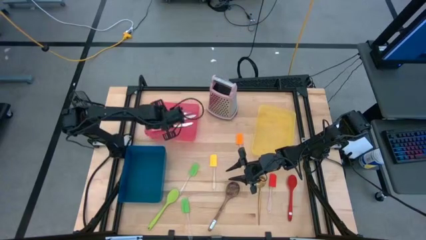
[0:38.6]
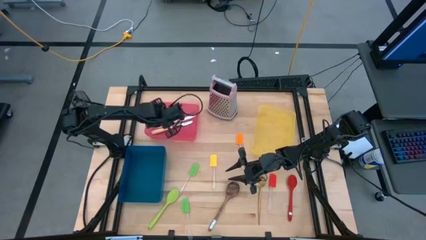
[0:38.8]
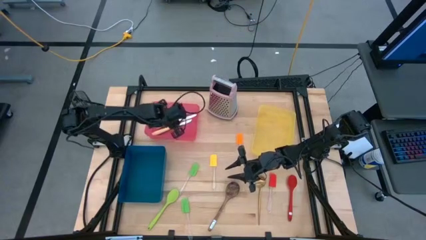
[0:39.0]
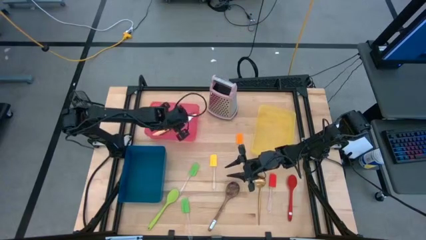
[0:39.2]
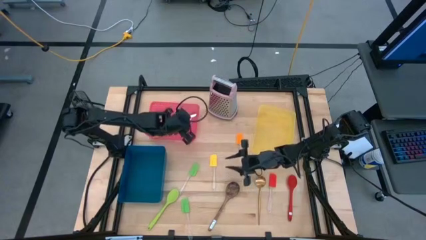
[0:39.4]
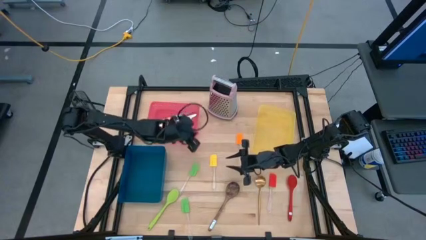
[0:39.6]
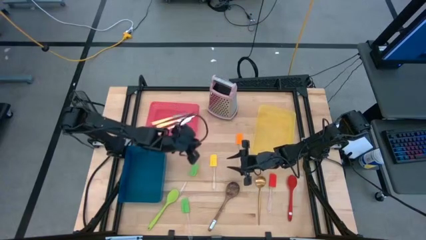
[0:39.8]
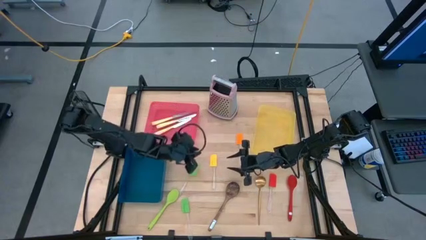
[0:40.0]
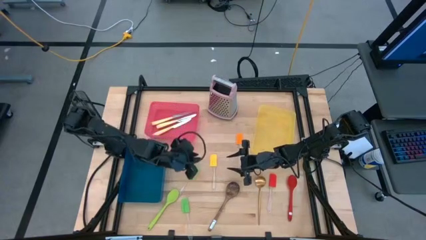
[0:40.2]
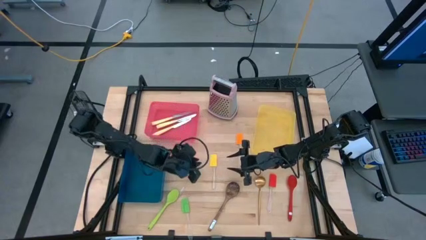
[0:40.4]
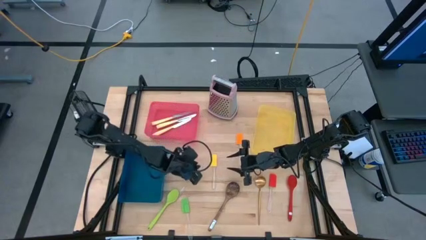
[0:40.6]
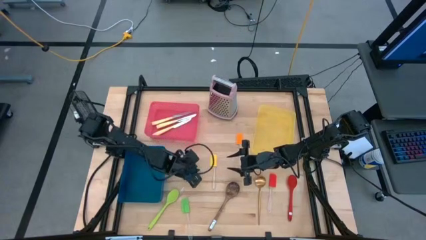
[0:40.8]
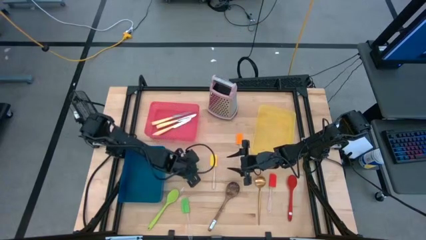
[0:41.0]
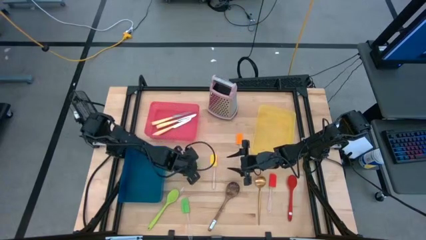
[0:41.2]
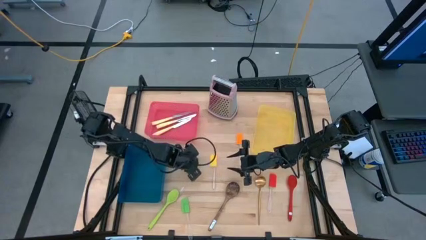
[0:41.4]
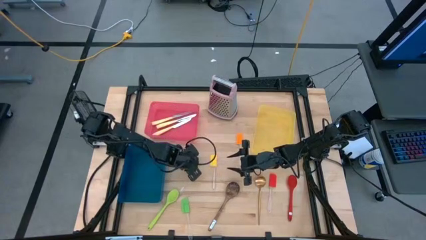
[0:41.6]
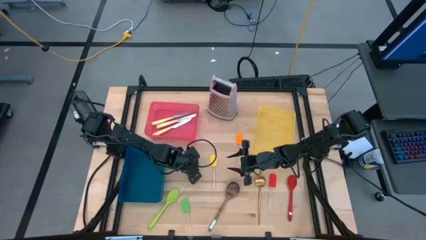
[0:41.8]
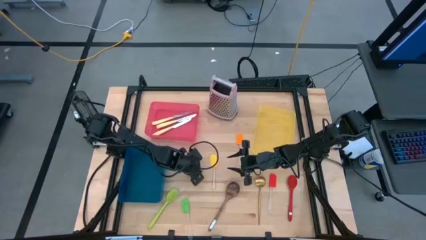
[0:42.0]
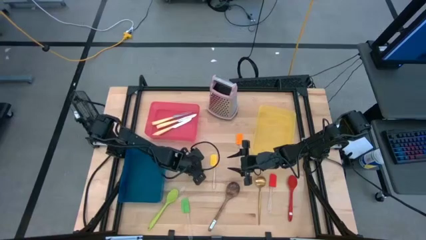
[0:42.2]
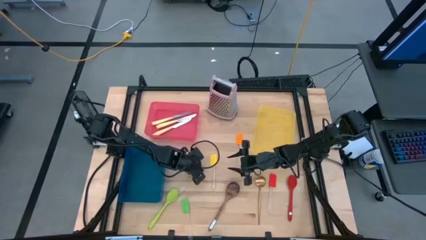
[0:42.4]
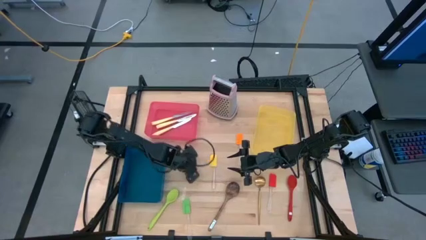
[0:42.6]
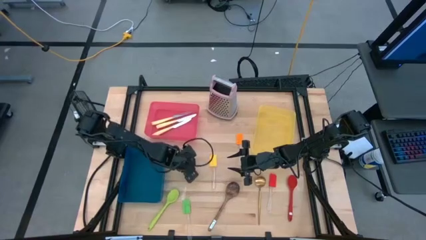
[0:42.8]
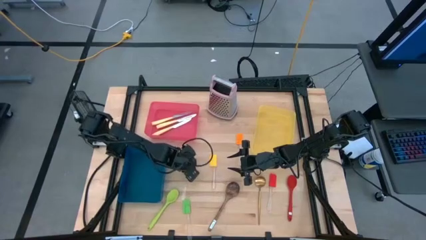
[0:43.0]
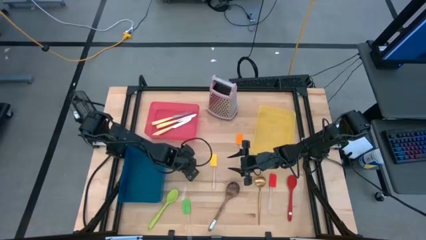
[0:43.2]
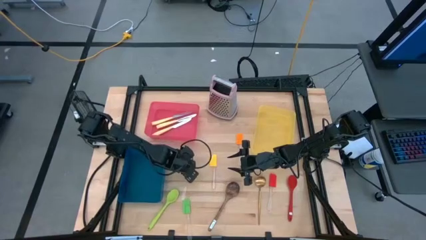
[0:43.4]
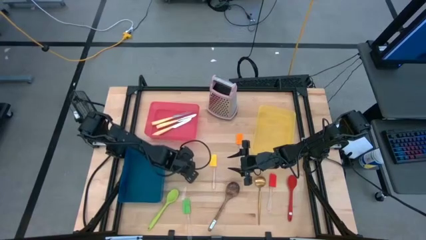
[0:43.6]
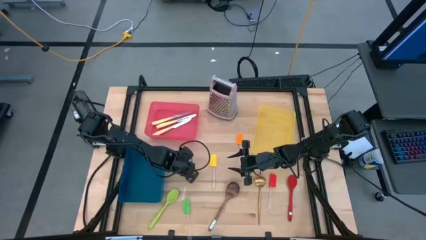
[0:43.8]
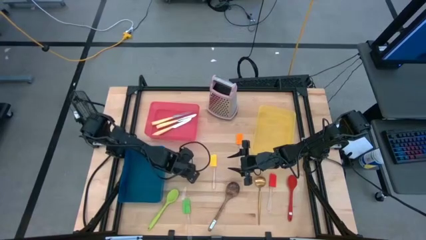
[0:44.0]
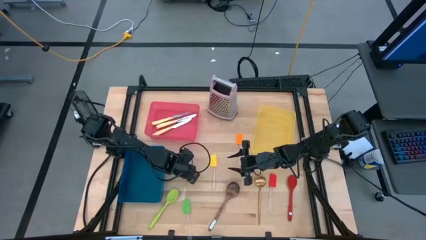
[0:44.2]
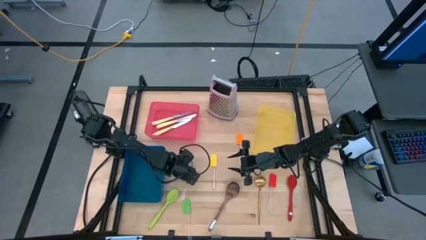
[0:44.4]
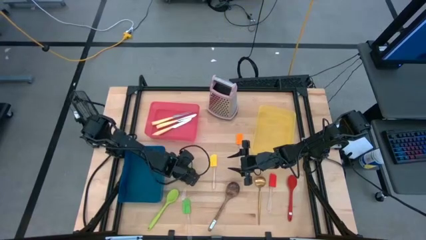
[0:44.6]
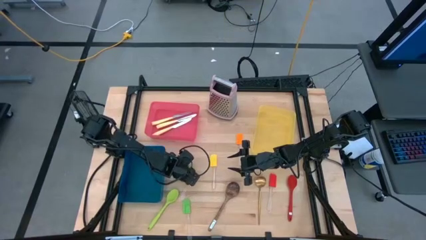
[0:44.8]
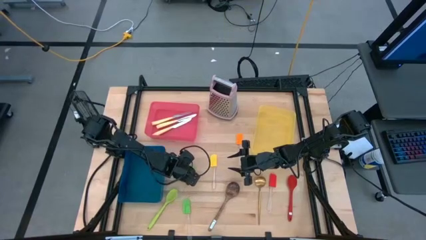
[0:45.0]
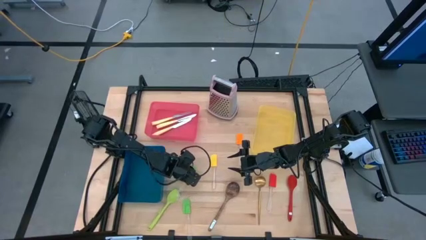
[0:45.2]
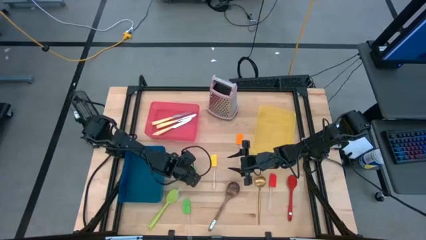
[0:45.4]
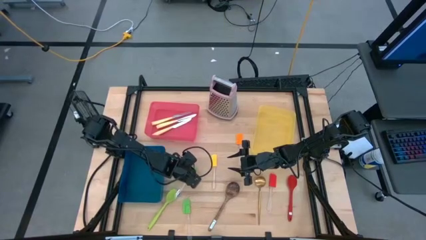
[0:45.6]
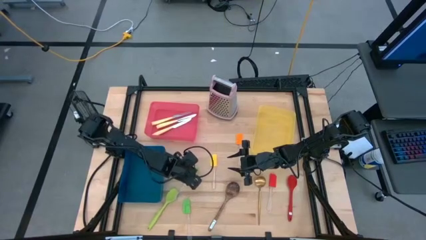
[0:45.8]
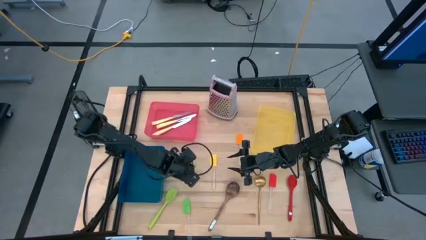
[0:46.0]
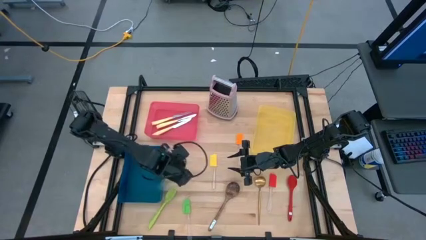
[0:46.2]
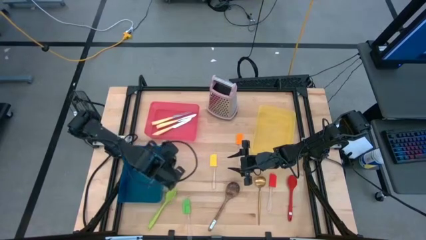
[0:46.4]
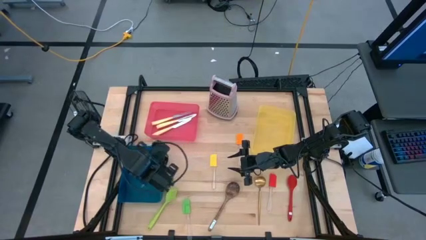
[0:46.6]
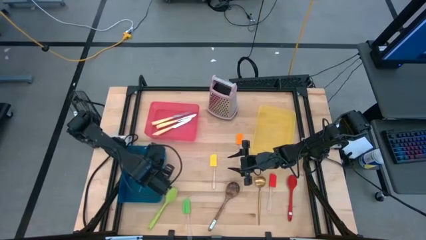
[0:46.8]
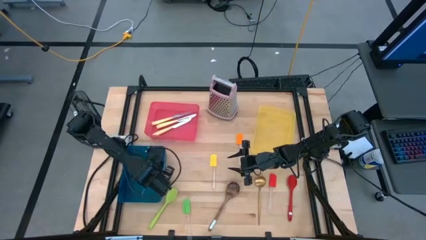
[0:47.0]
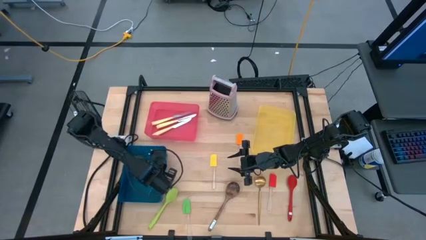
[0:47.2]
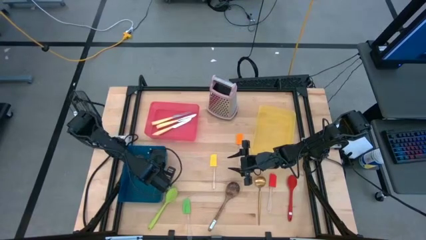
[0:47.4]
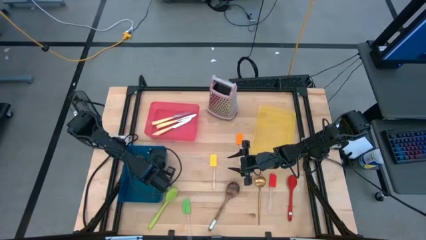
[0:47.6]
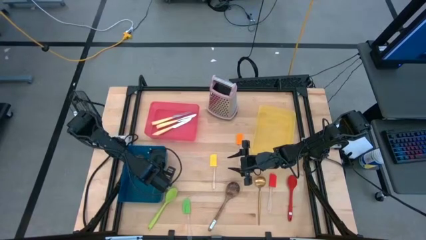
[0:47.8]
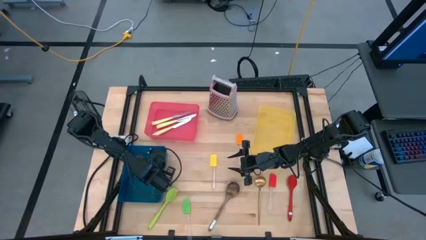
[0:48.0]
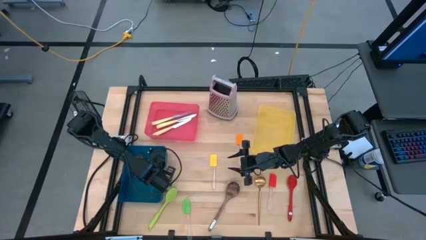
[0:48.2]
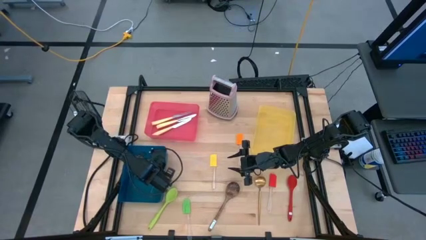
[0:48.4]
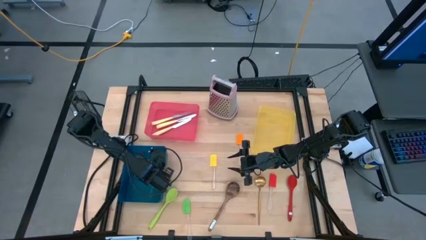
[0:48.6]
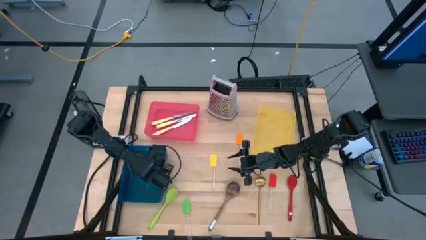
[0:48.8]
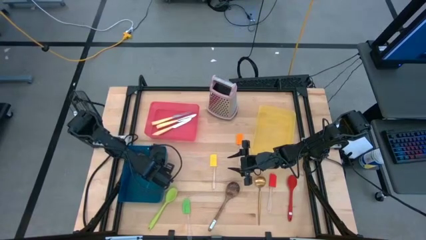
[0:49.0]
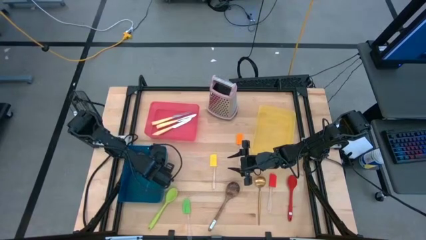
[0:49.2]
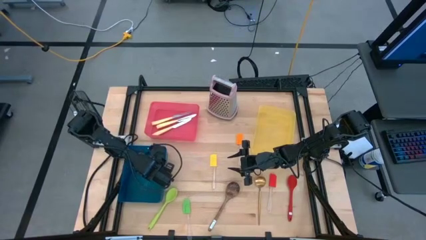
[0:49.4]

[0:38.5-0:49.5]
Task: Pick & Place Kitchen Items
Put the green spatula into the blue bin

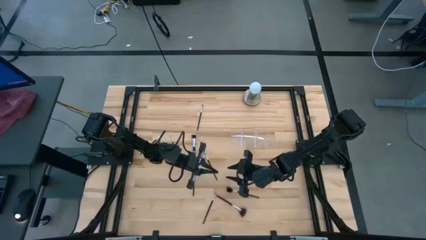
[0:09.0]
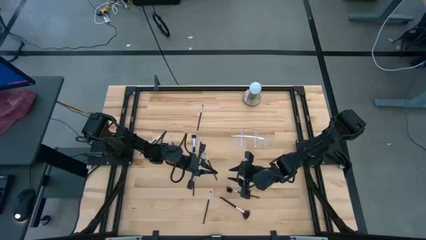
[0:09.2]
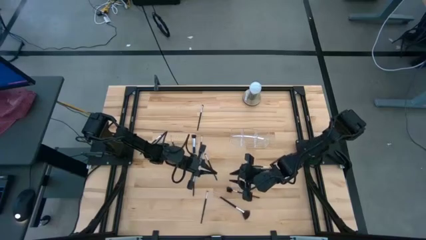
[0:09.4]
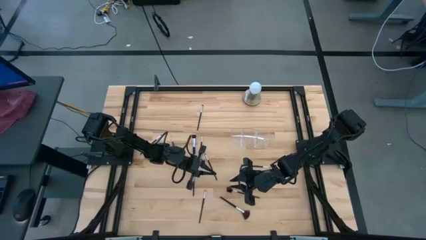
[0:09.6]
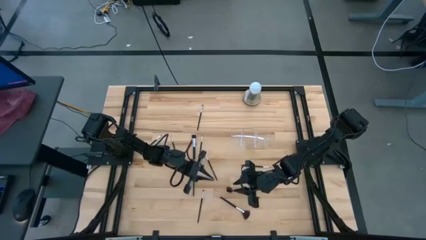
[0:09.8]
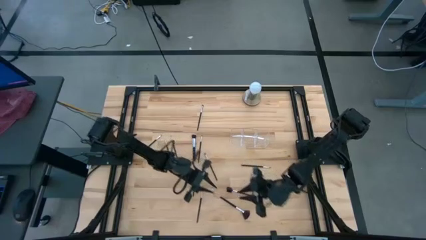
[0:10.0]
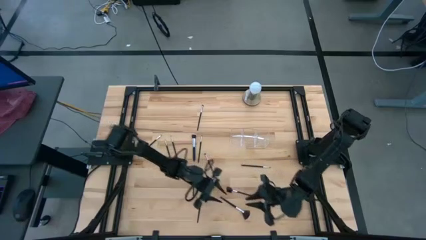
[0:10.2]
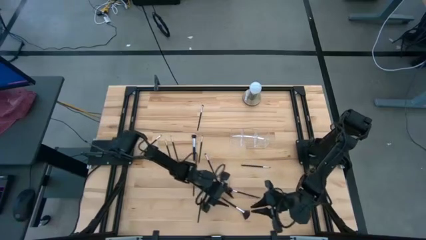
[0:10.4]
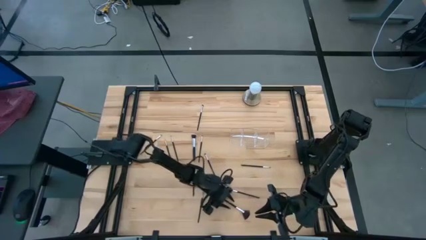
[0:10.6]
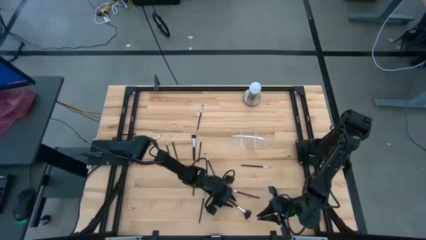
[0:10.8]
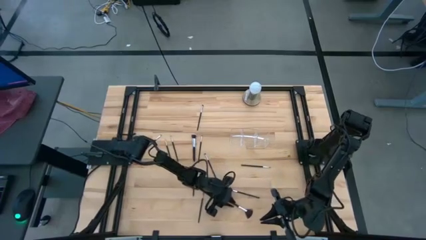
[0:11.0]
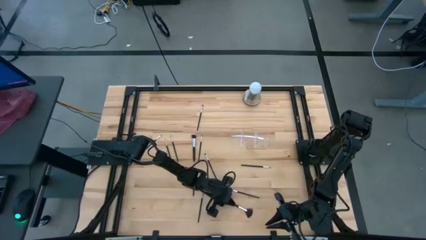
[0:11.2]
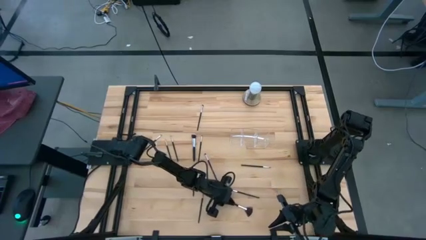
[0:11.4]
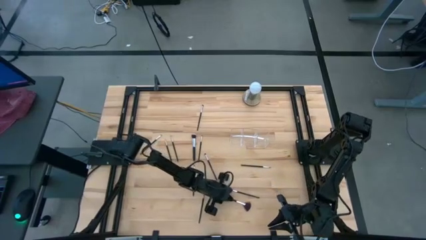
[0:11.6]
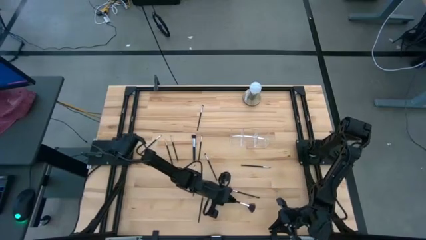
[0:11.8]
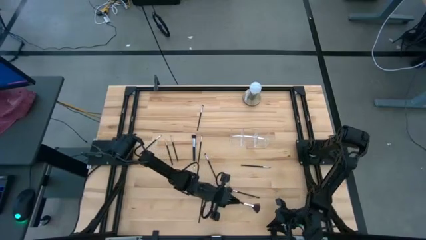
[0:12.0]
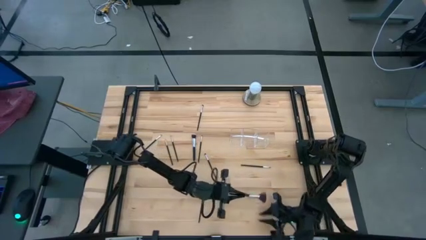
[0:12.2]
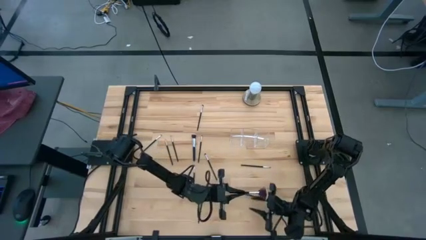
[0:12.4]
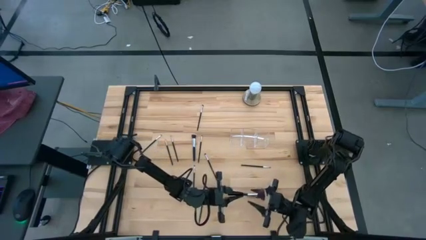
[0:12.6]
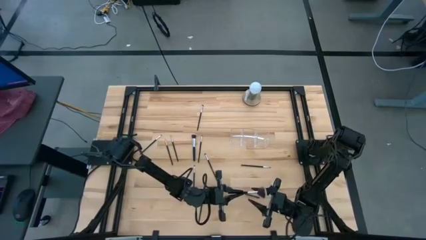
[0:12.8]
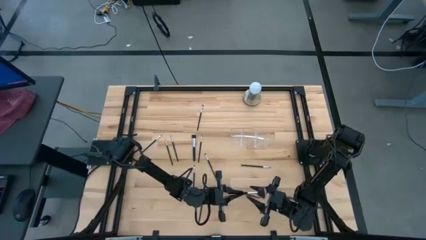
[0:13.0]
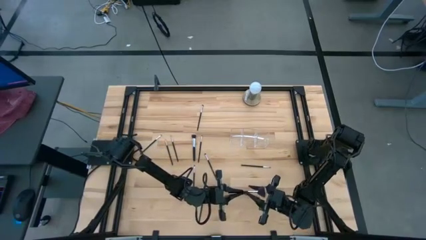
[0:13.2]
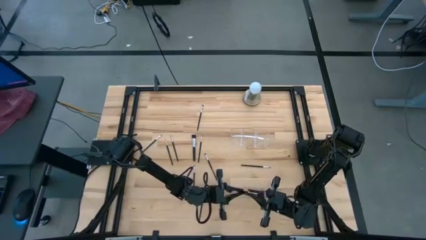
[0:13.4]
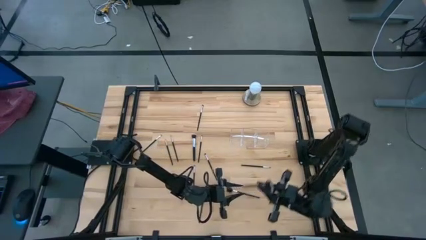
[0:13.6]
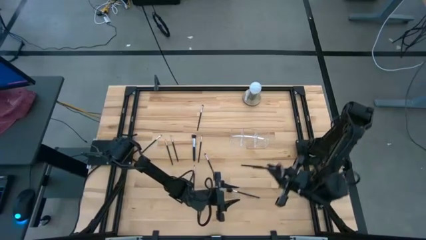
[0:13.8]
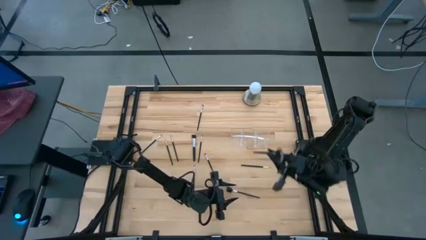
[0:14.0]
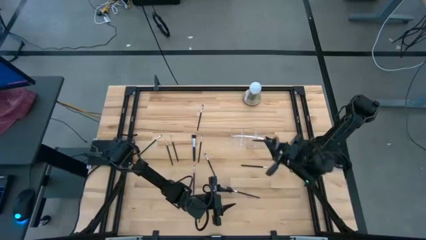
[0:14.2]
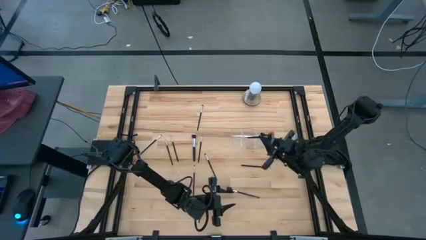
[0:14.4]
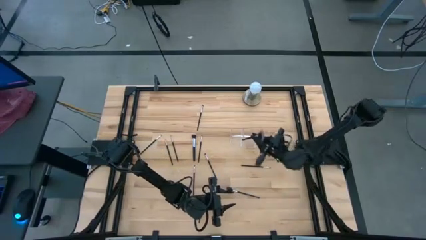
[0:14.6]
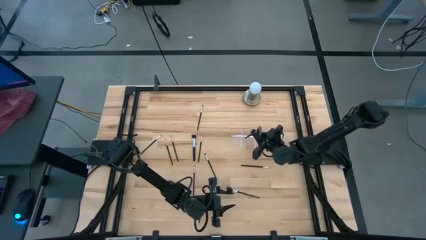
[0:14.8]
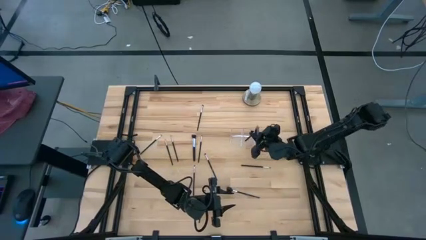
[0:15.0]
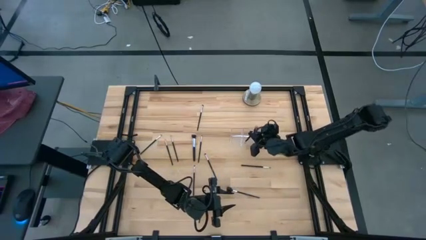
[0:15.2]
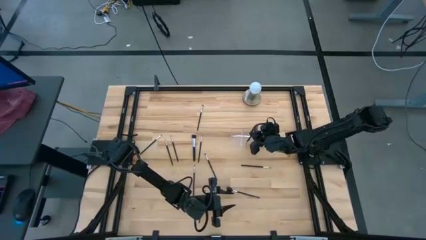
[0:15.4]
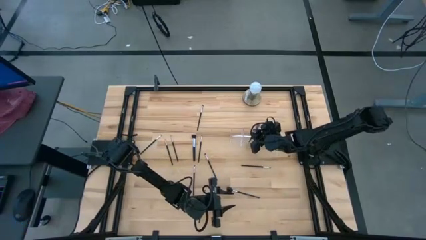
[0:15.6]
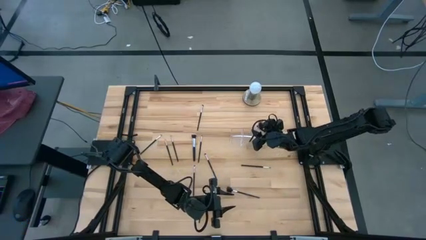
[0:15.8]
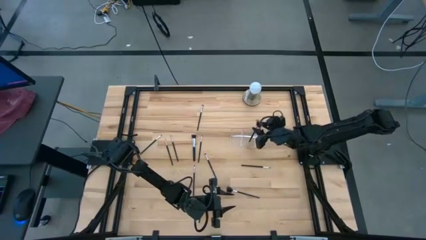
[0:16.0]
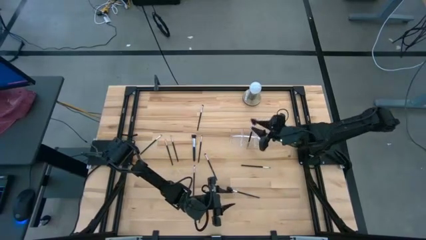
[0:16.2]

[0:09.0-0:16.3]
Task: Put items in baskets/containers
Put the black highlighter brush into the transparent organizer
